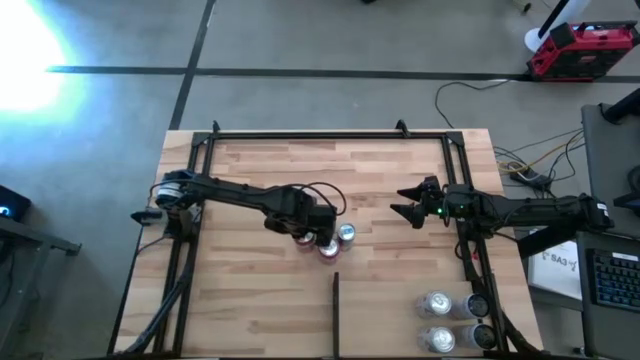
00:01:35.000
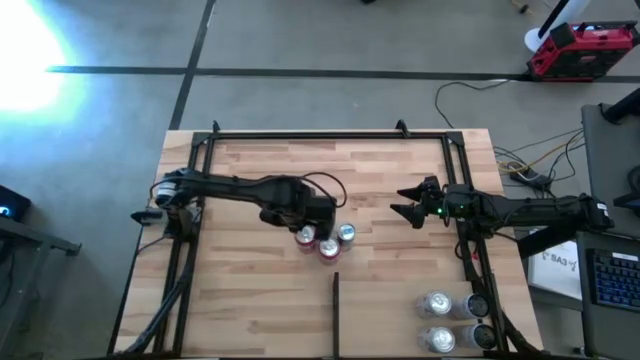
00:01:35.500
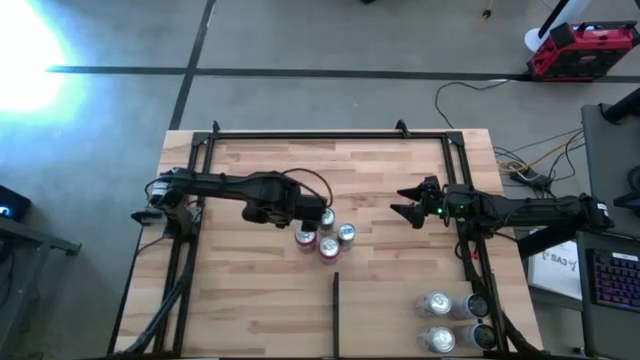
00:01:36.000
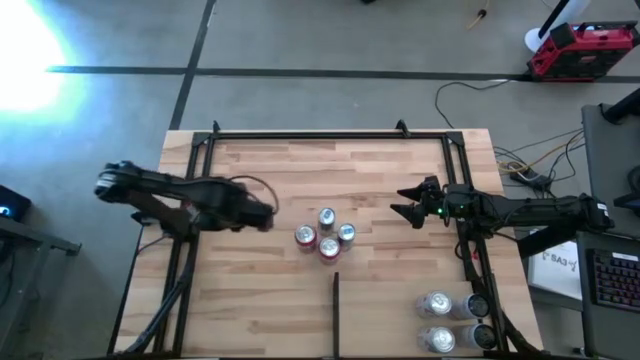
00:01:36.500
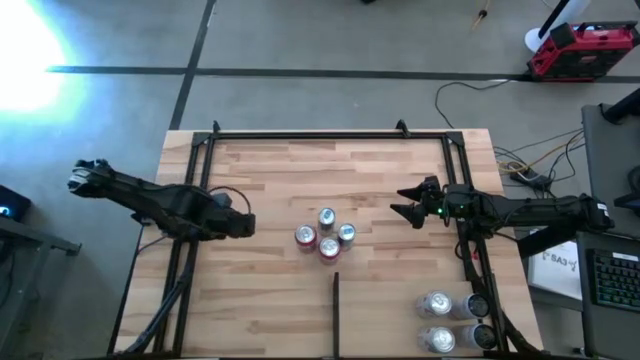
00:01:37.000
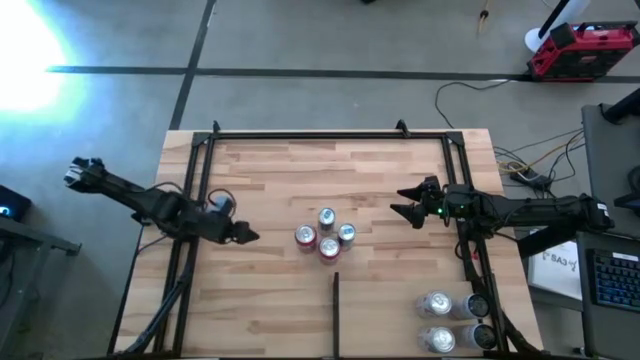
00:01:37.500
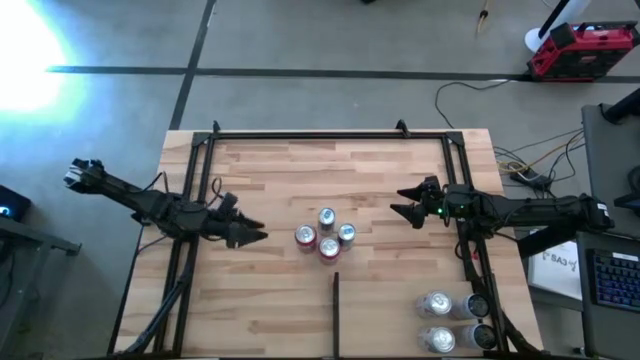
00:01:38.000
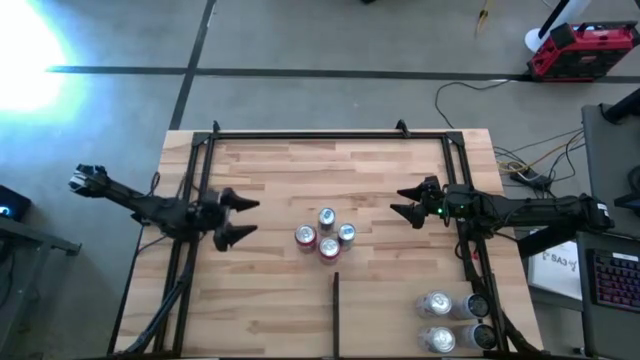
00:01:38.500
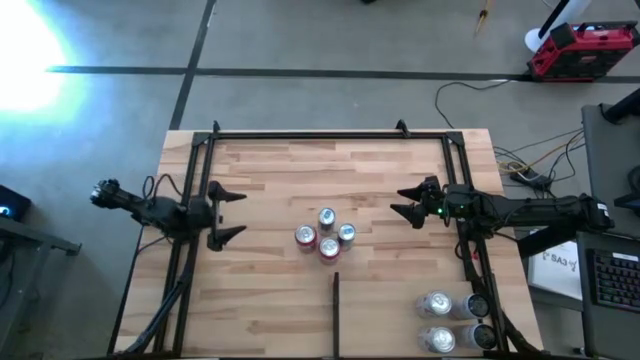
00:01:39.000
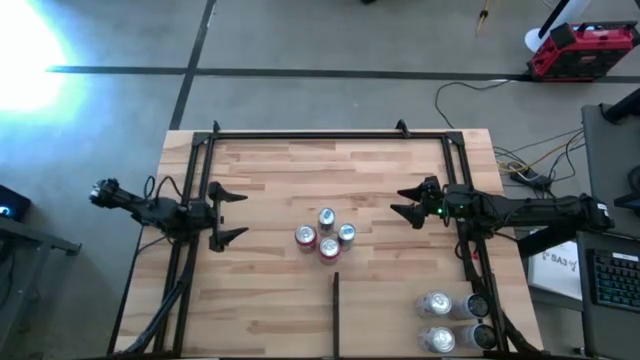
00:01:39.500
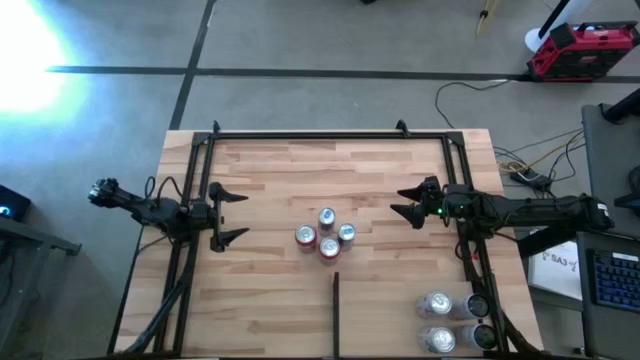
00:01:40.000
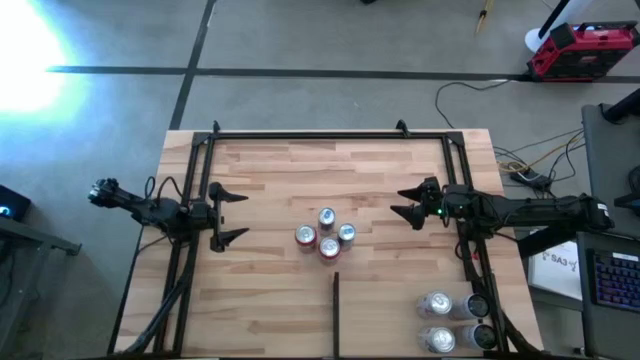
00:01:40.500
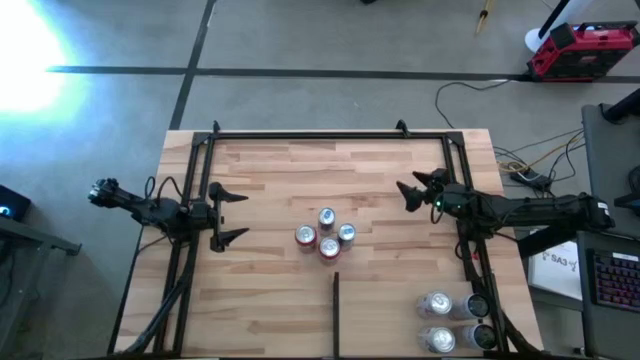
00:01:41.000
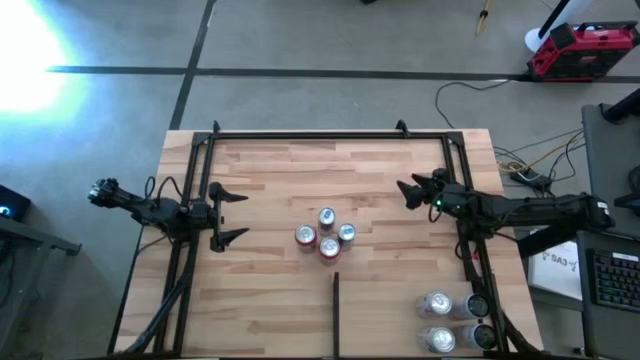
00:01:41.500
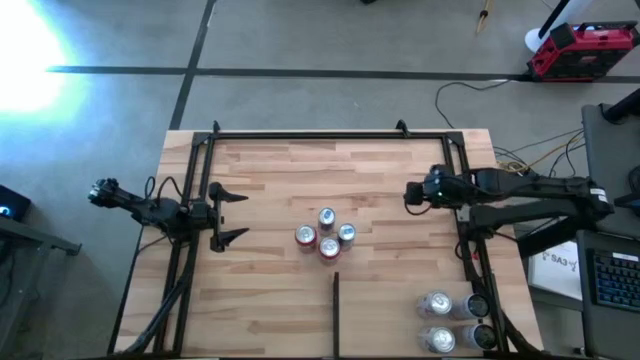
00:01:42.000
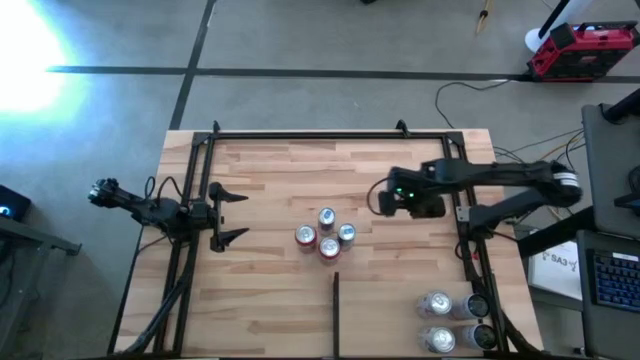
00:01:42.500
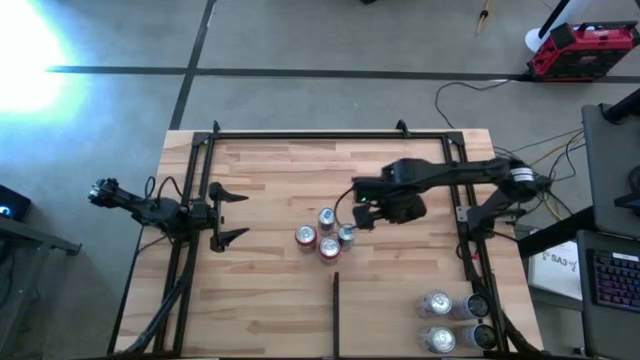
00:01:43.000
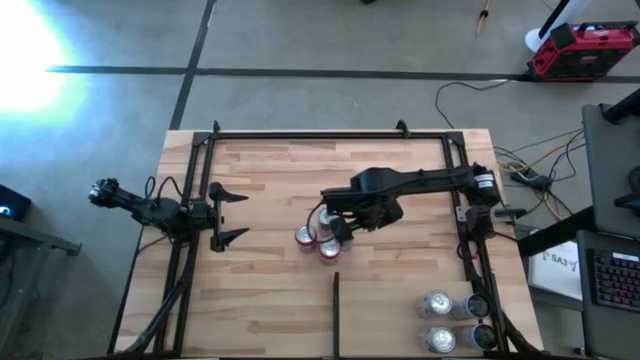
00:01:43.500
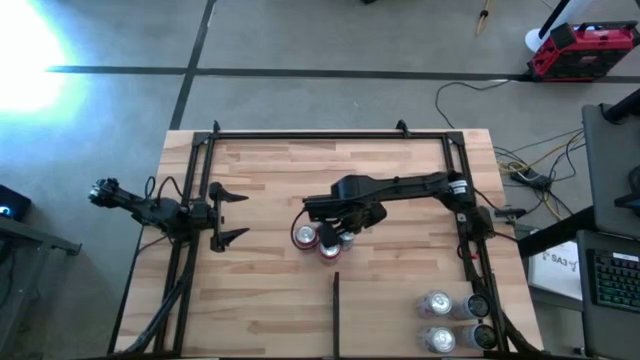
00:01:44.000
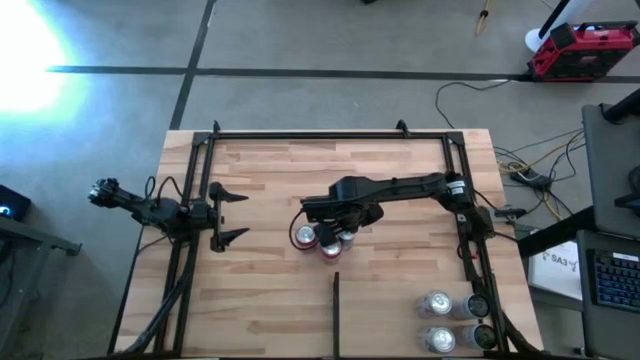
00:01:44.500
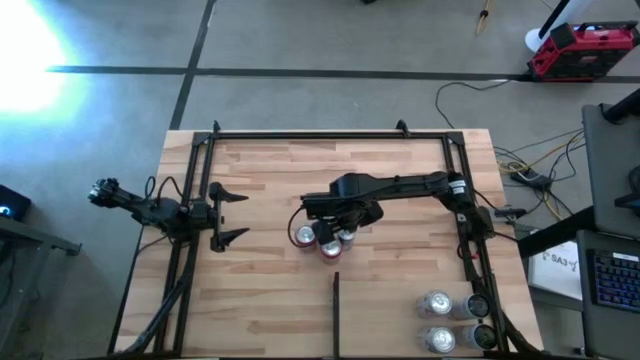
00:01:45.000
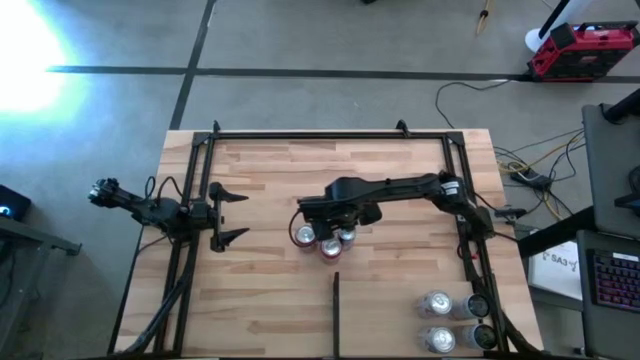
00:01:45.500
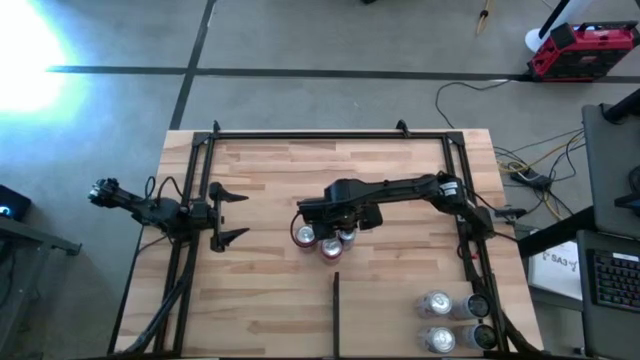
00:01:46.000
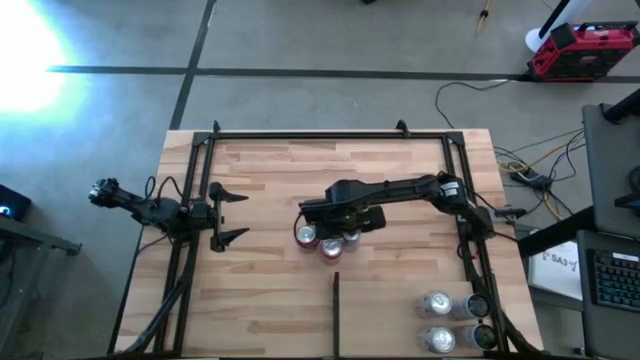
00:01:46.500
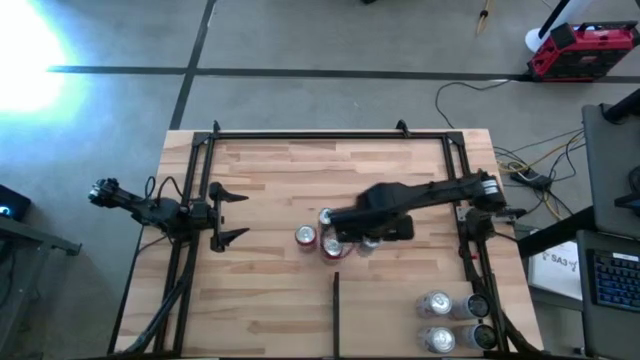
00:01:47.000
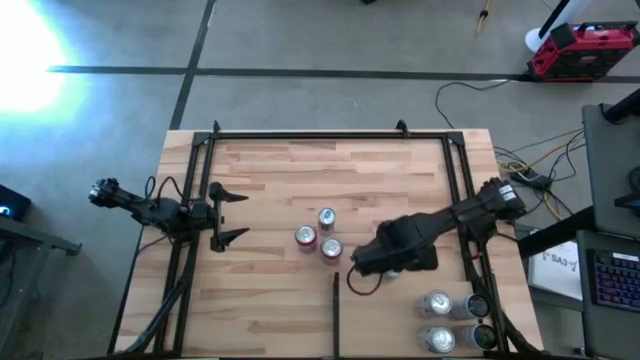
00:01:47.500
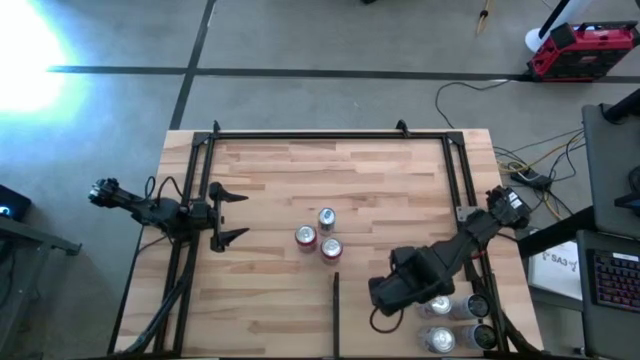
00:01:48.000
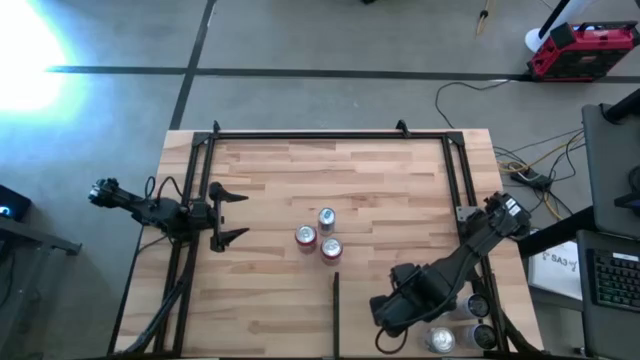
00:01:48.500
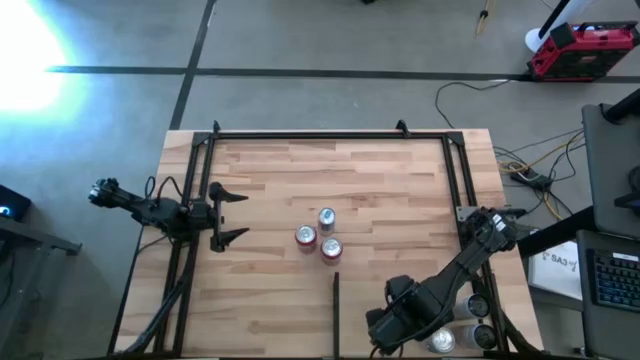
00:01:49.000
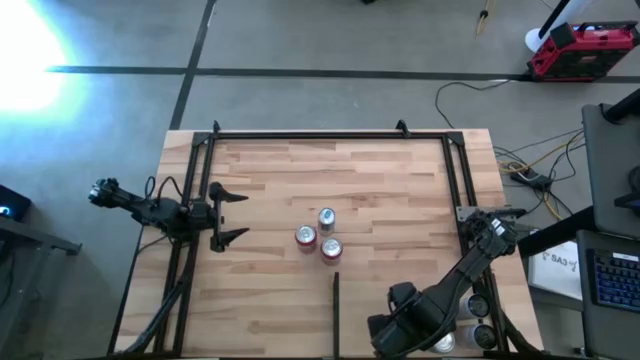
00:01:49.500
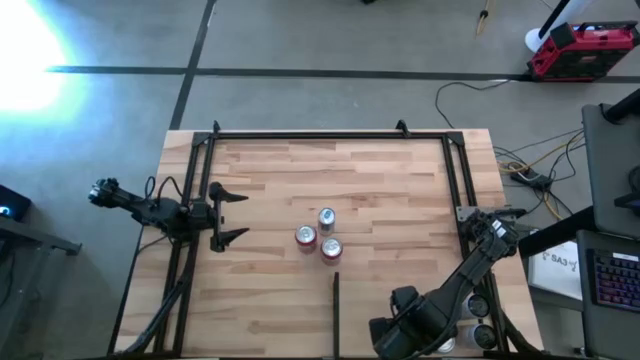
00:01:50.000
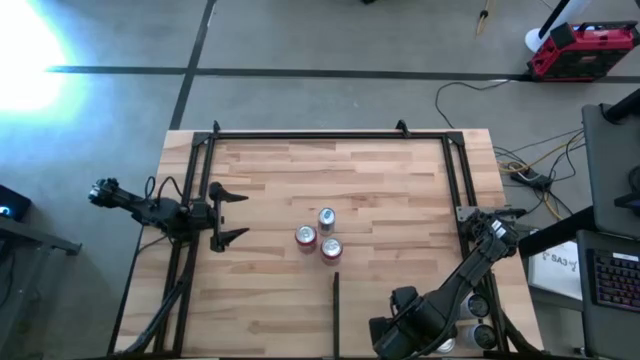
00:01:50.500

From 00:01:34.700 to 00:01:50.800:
Task: Place canned beverage on shelf
Put the bottom blue/white soda can on the shelf

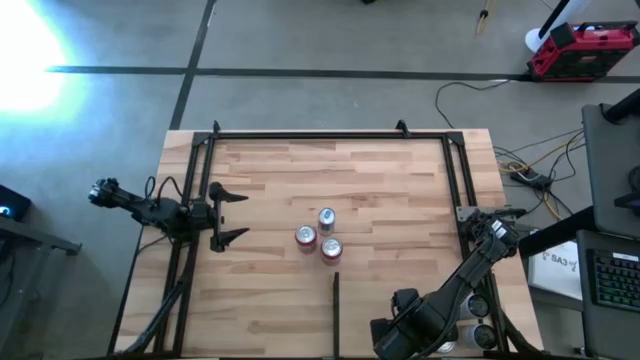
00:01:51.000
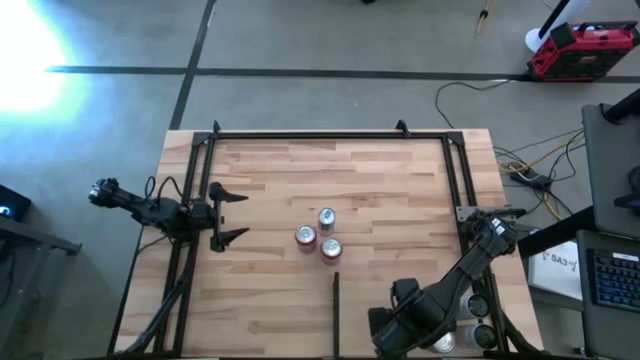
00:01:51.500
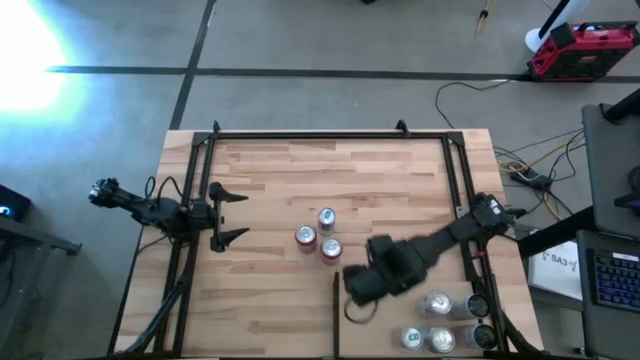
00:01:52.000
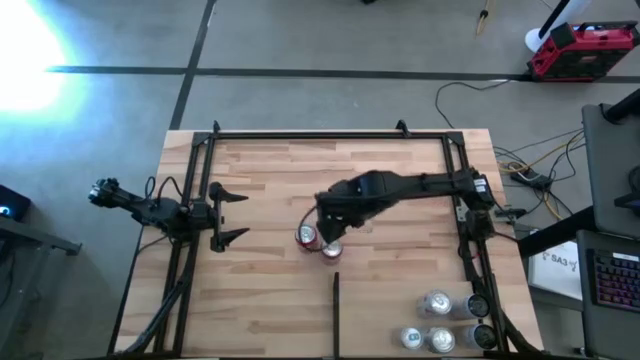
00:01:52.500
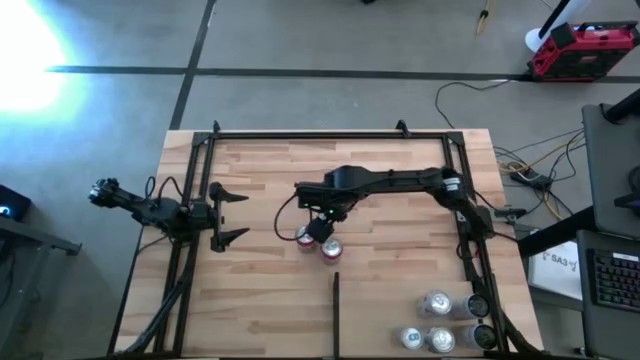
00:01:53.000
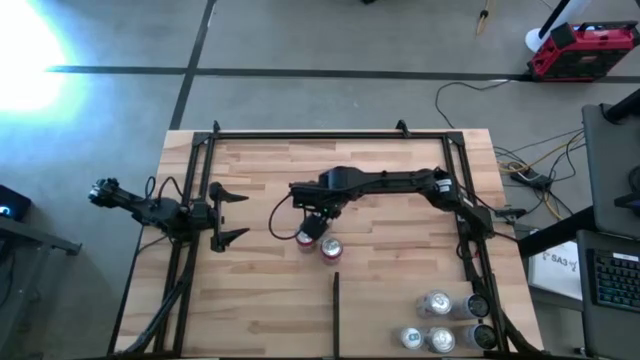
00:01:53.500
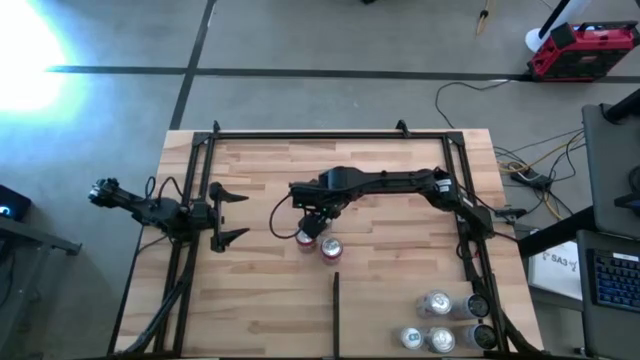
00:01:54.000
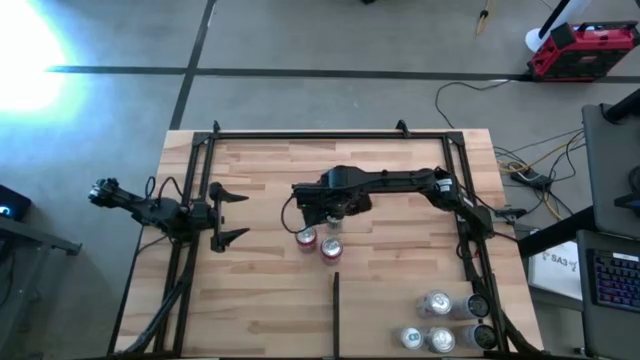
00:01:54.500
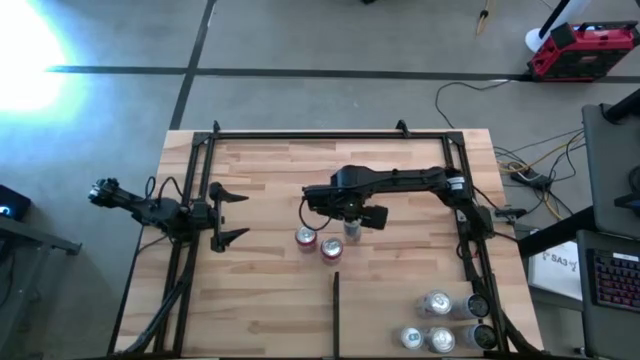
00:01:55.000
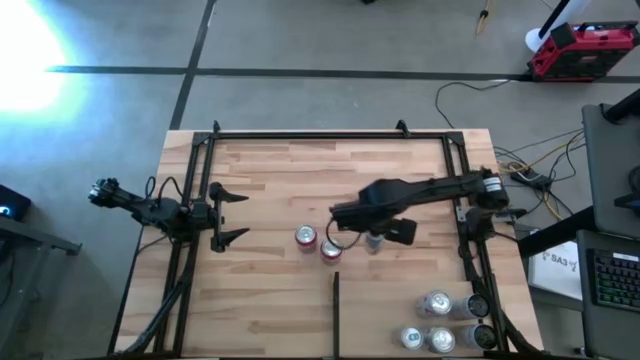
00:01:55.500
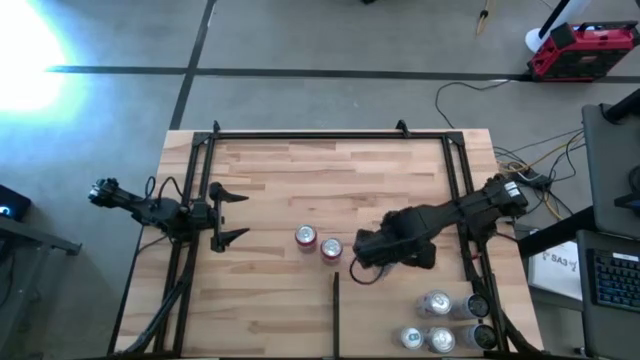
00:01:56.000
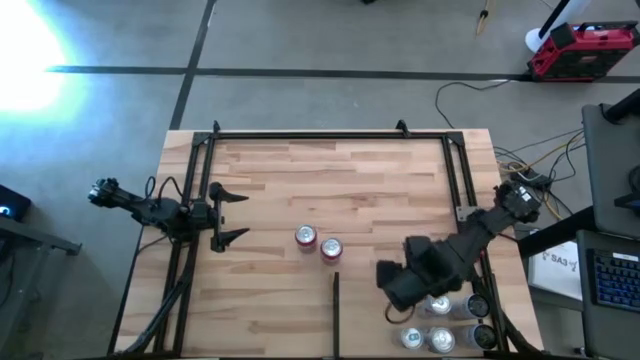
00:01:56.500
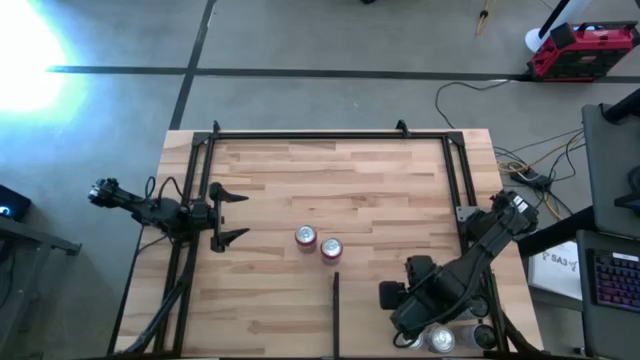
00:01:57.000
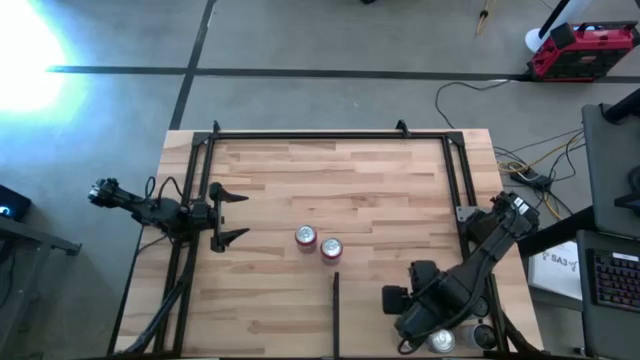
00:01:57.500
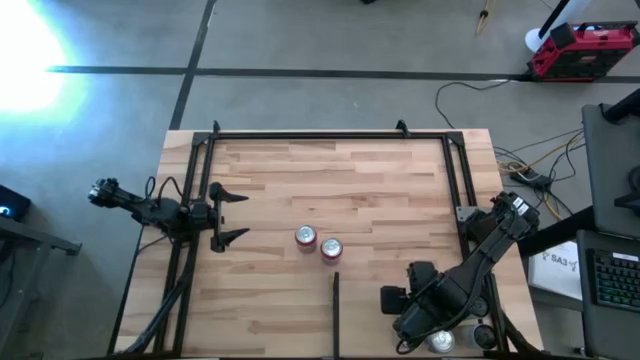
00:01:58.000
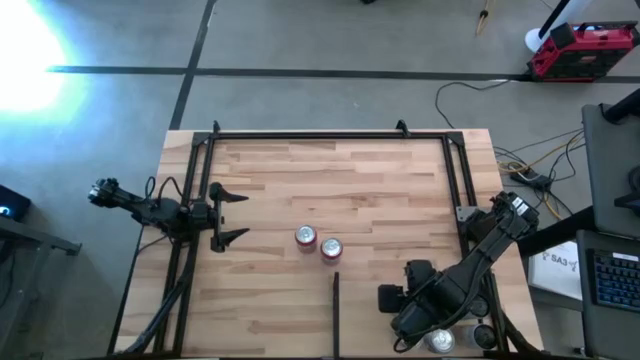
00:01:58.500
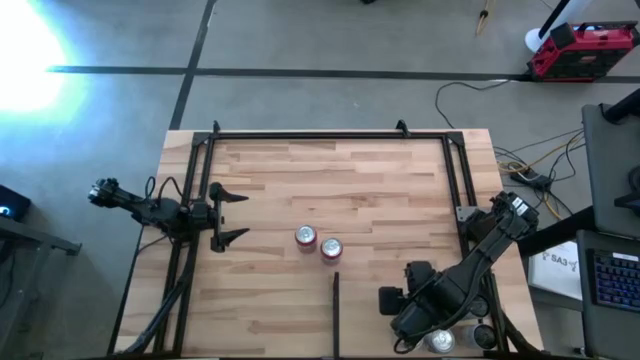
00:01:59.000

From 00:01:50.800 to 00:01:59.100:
Put the white/blue soda can aligned with the white/blue soda can on the shelf
